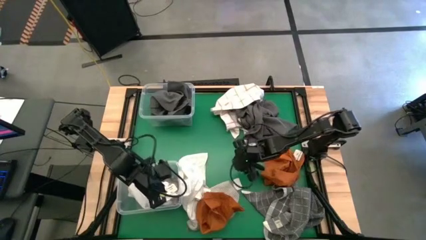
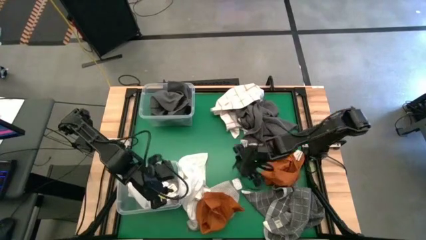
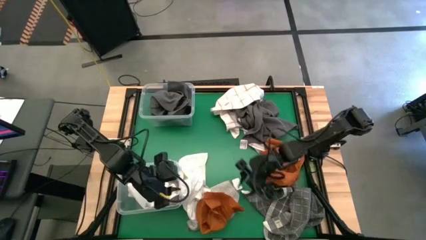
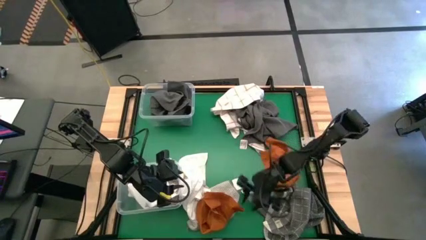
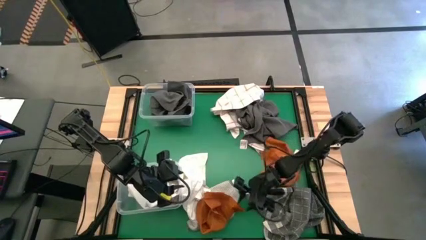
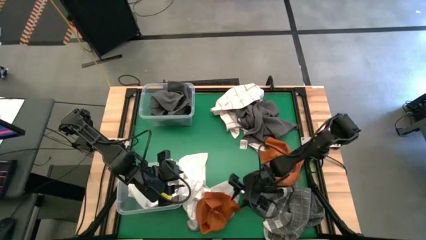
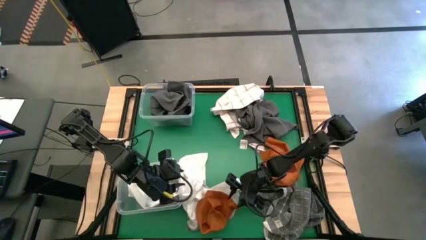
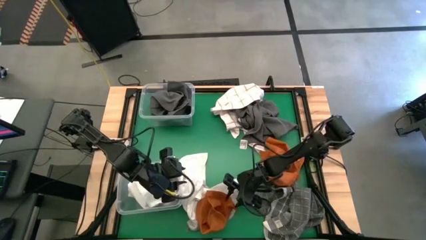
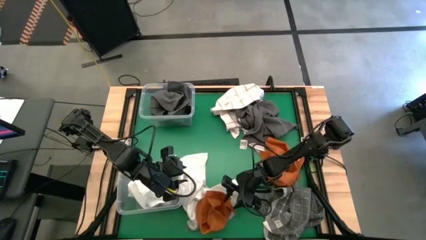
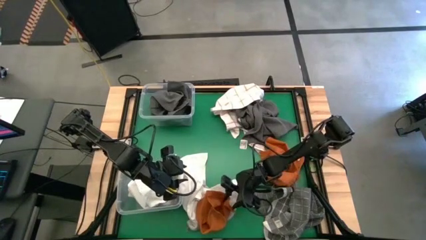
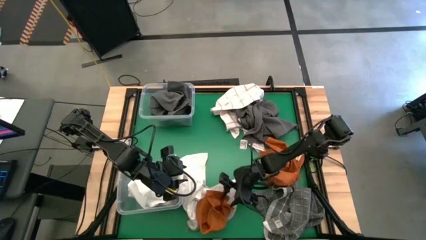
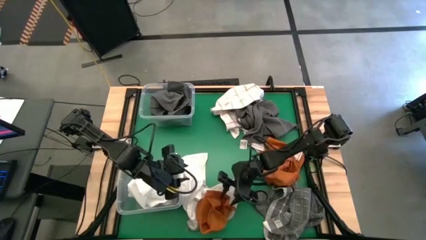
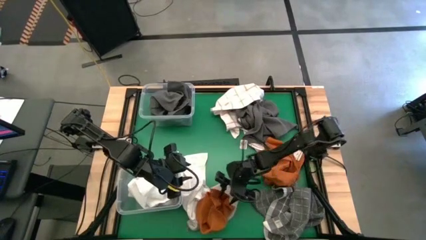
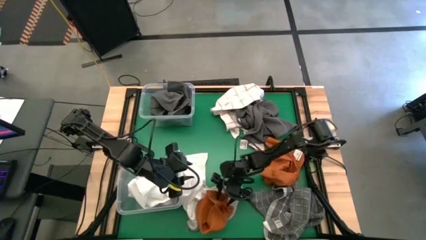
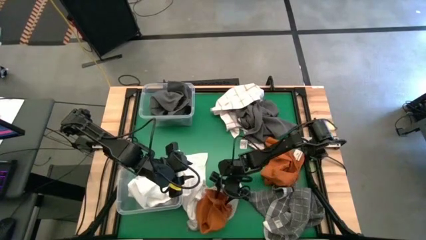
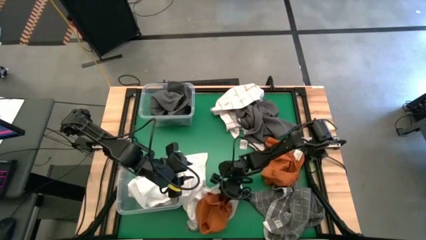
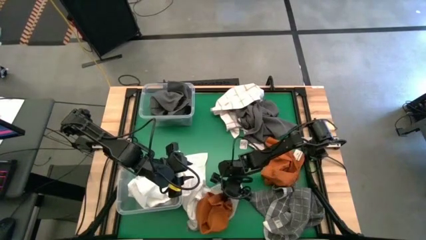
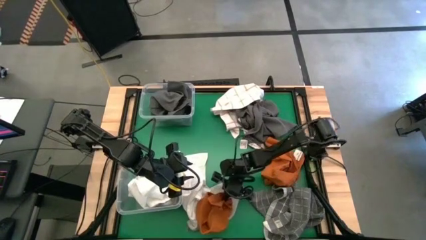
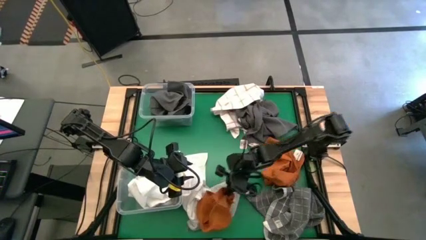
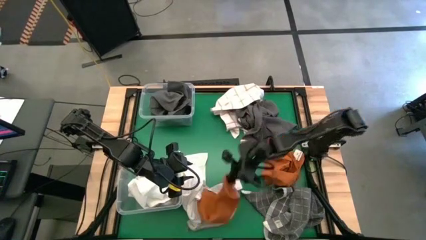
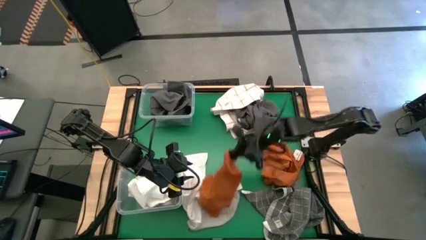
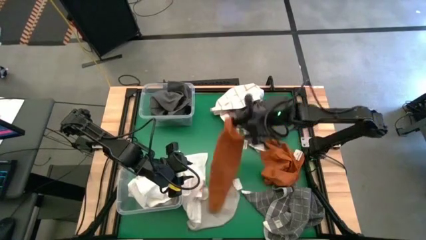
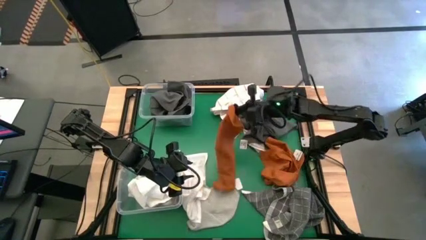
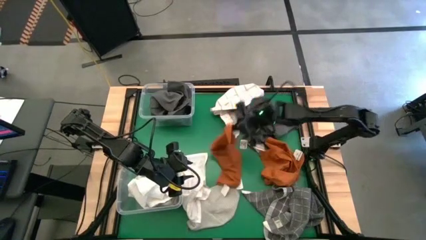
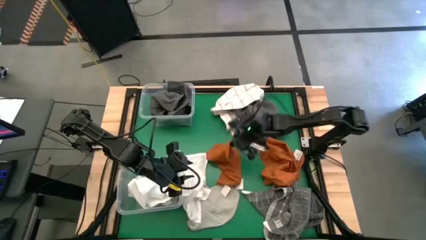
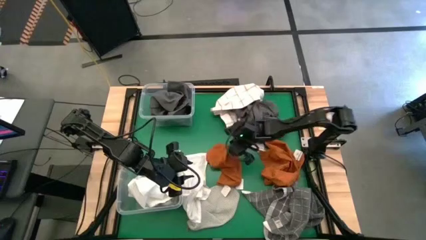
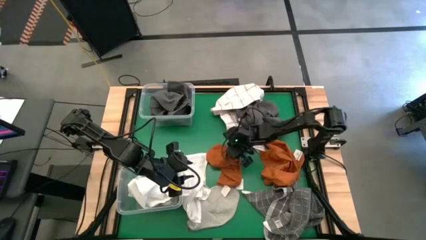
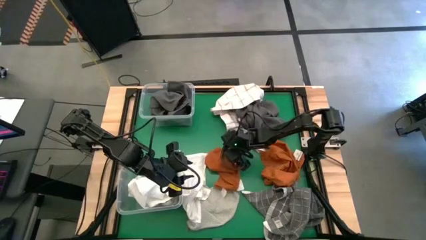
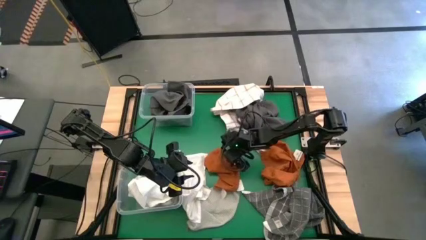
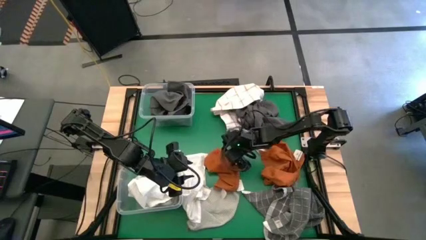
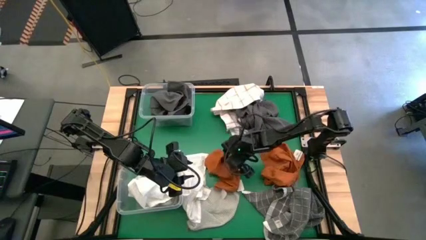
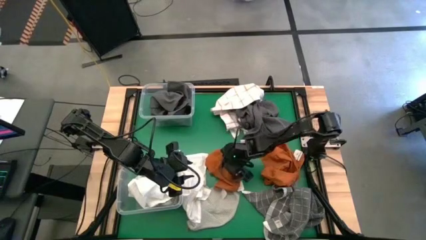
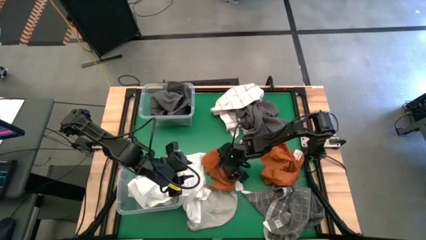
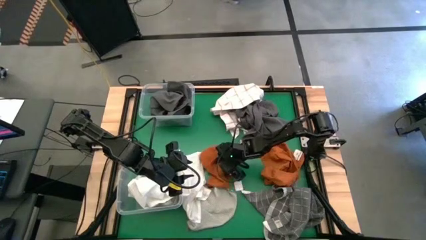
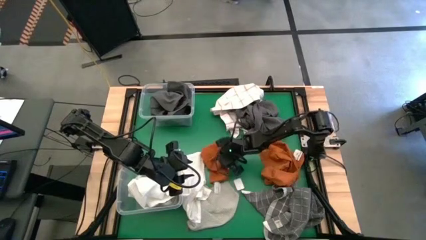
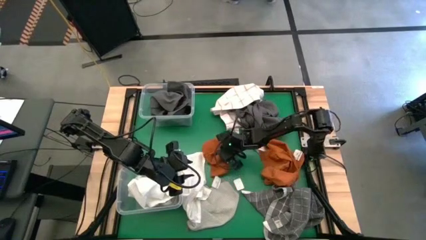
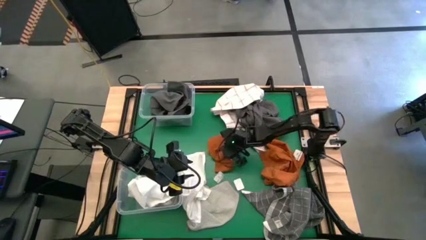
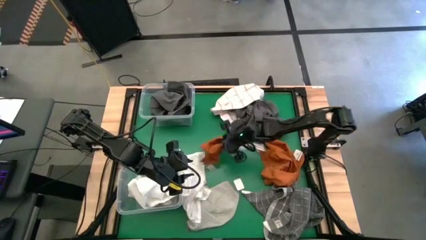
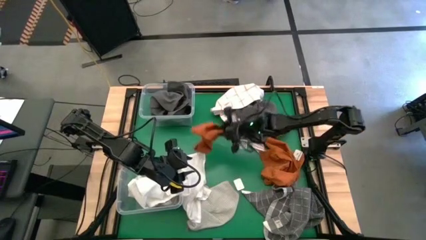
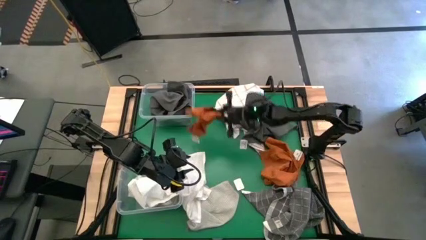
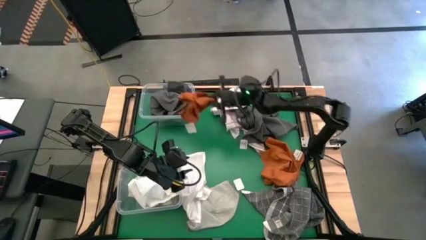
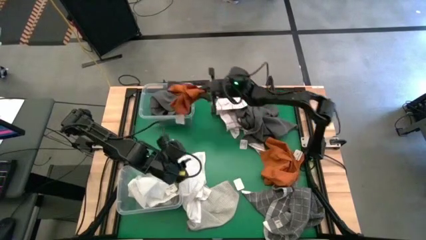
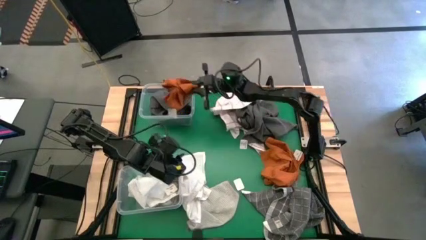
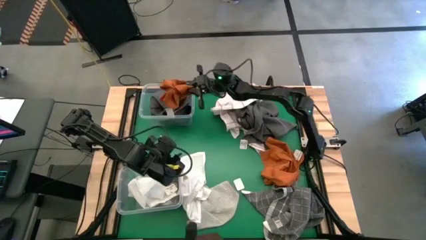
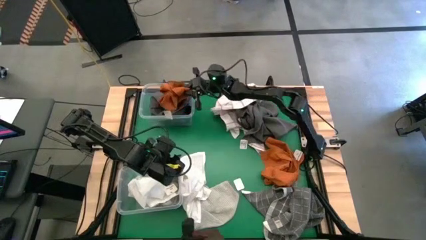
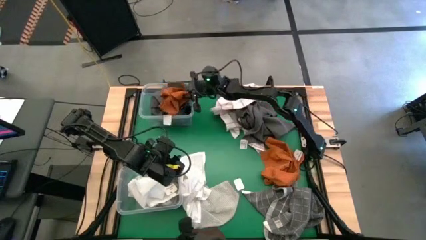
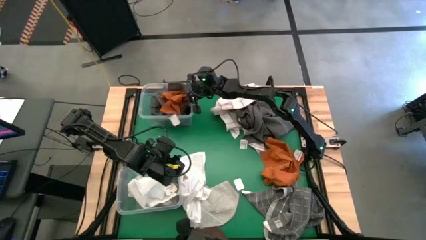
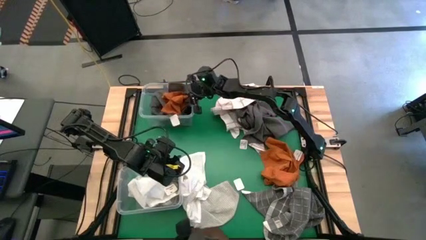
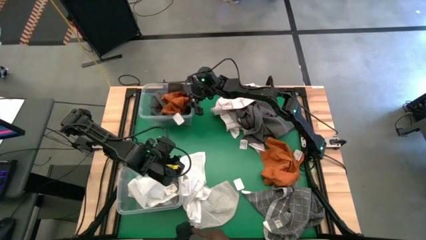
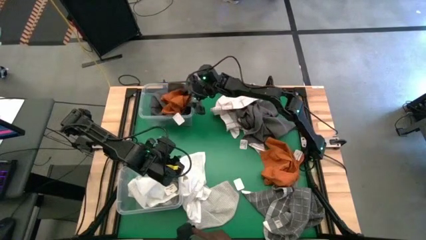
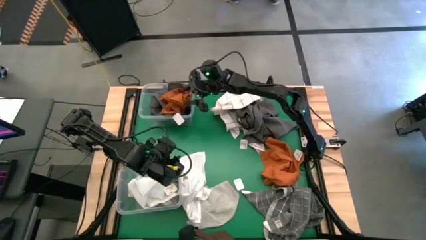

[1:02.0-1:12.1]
Task: Sort towels by color in basket
Put the brown towel into the top transparent bin

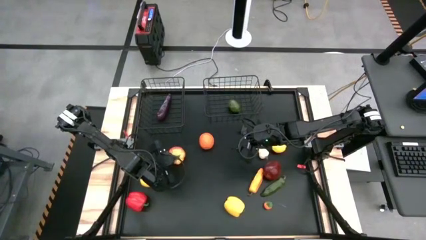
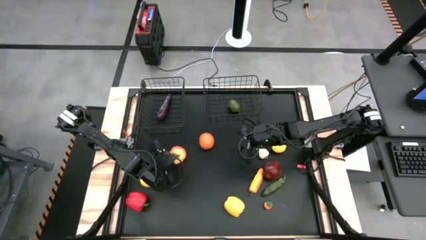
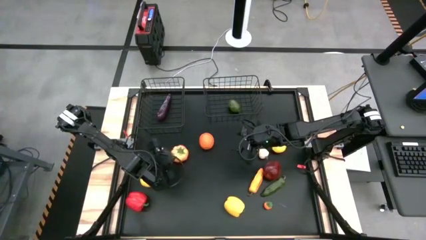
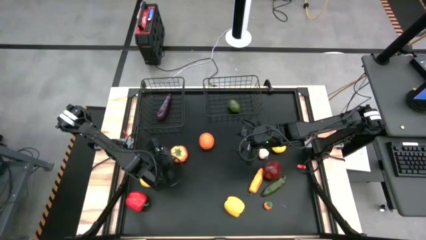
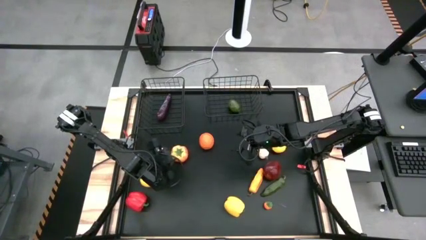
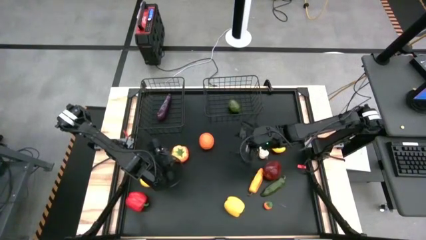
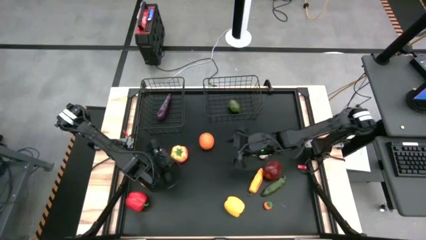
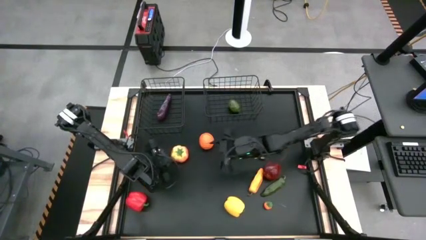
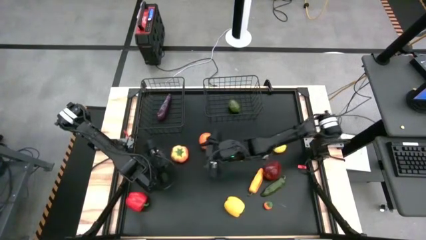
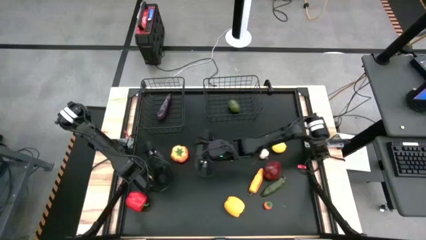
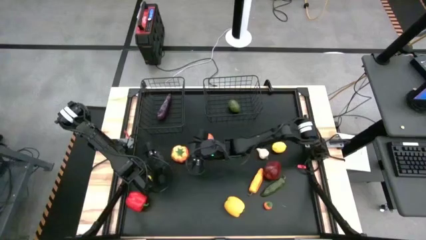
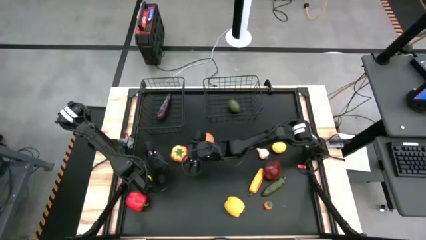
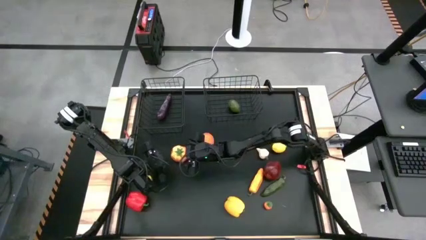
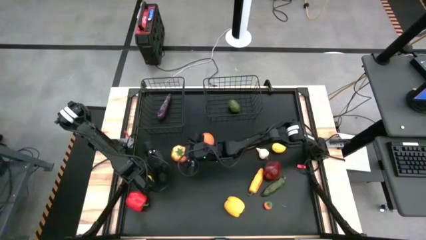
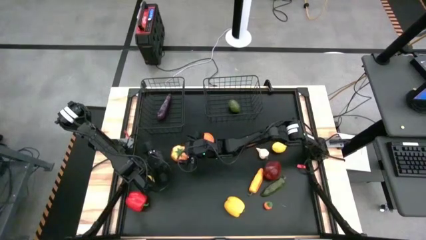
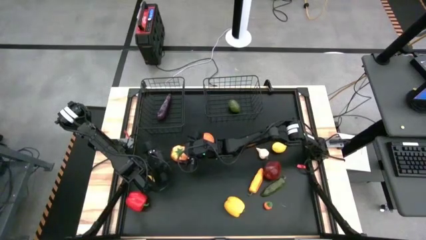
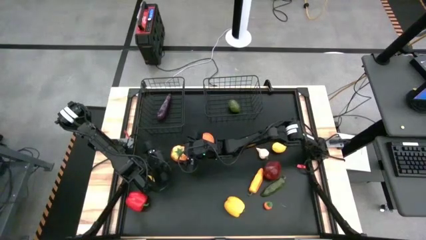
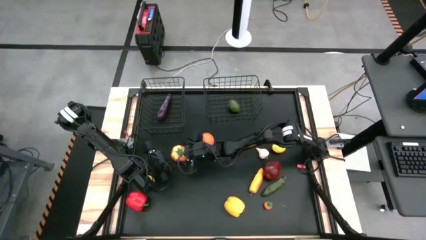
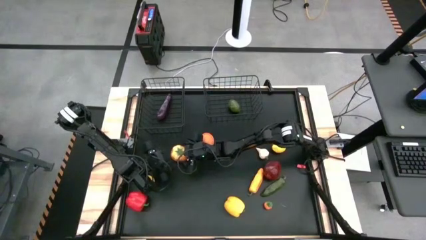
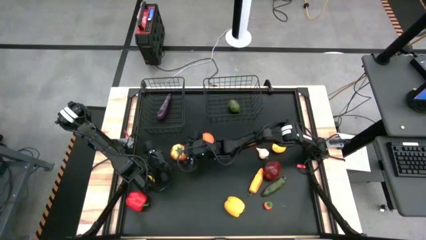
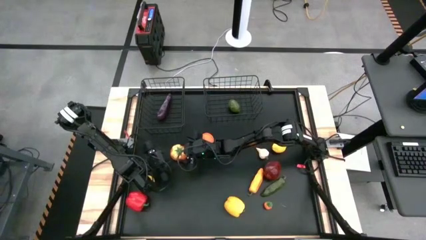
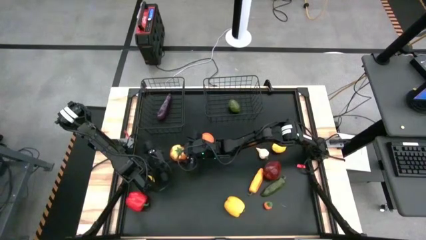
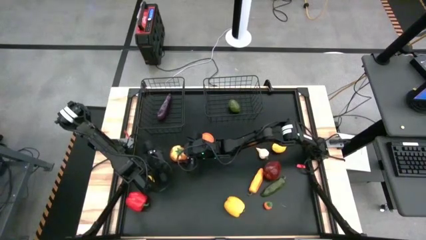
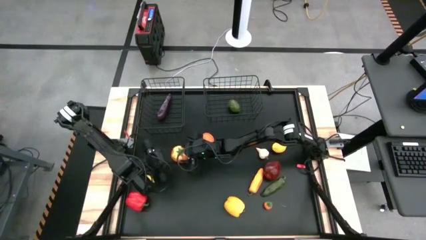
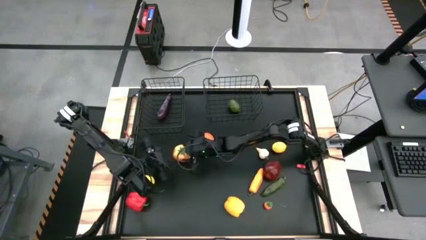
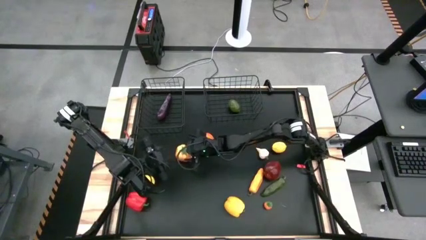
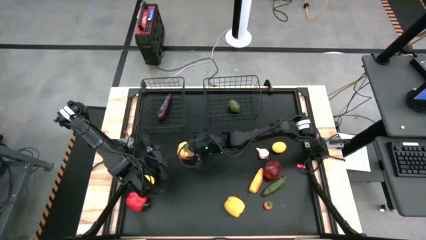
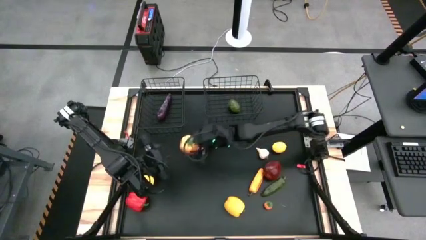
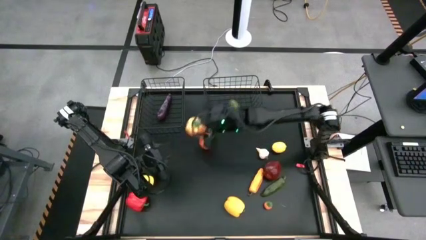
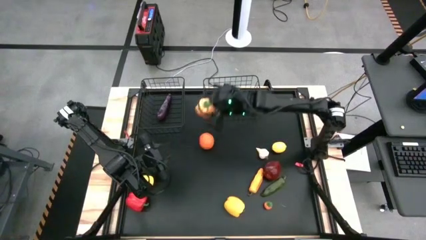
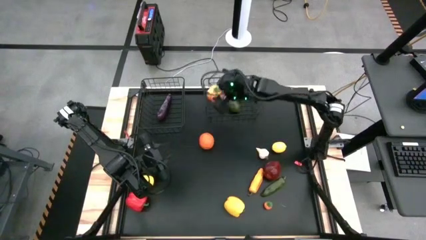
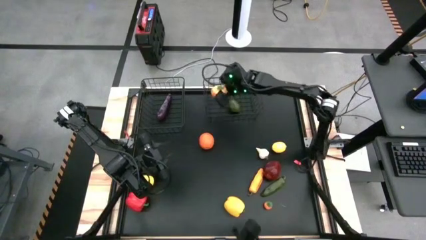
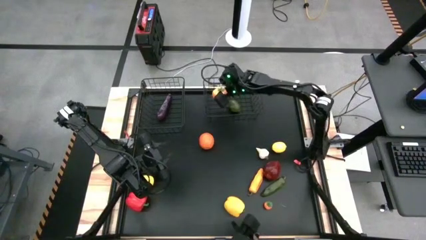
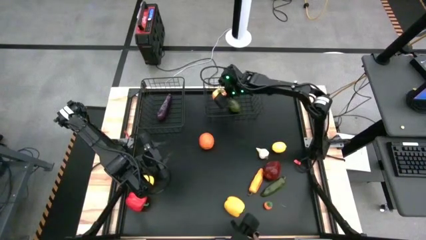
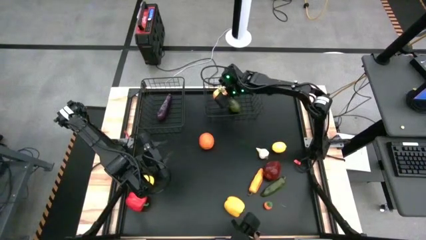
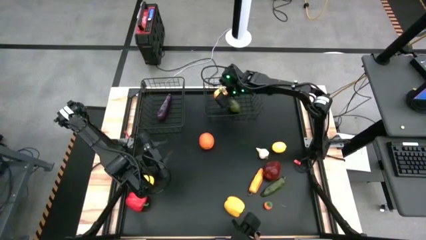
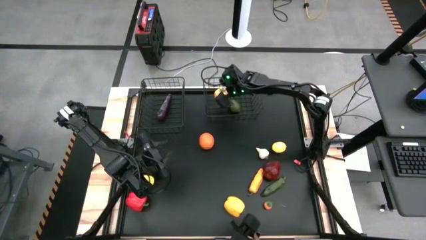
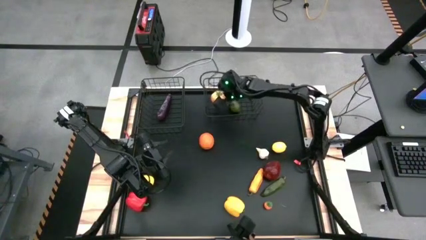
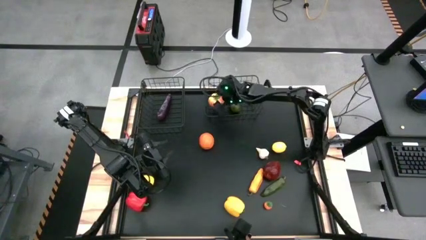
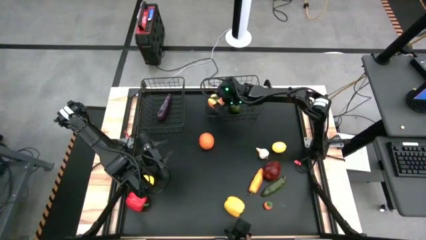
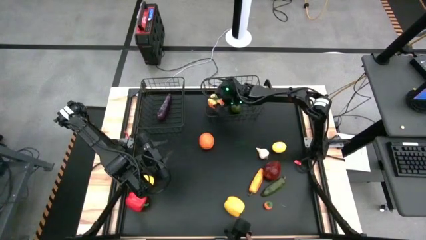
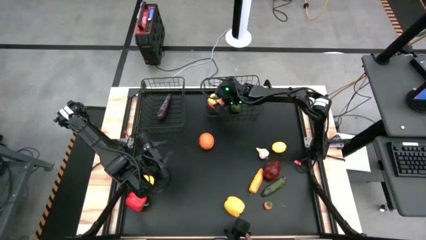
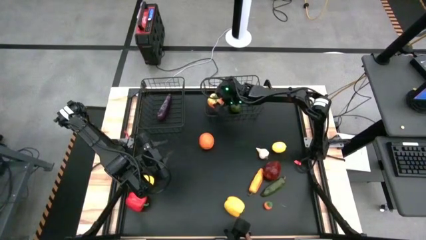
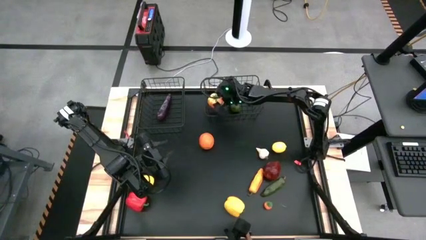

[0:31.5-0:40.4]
Task: Sort produce into baskets
Put the orange tomato into the right black wire basket
